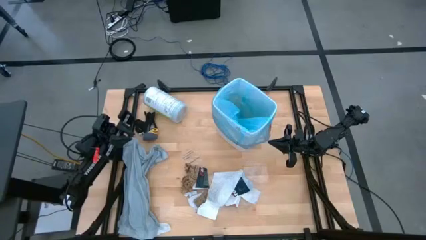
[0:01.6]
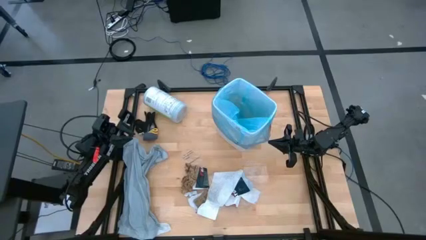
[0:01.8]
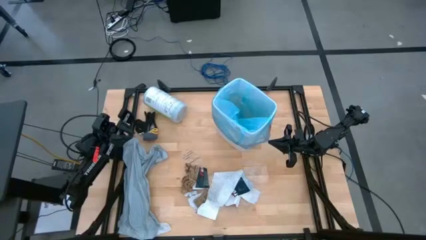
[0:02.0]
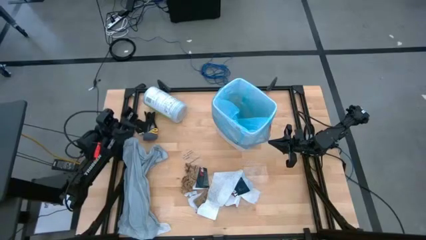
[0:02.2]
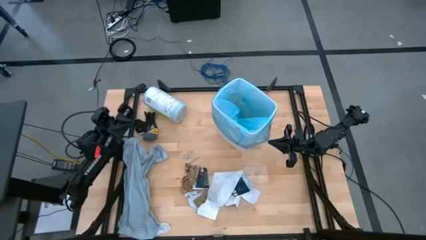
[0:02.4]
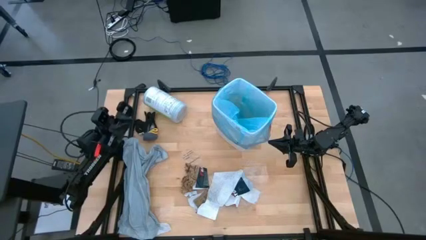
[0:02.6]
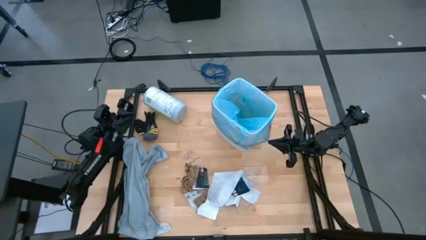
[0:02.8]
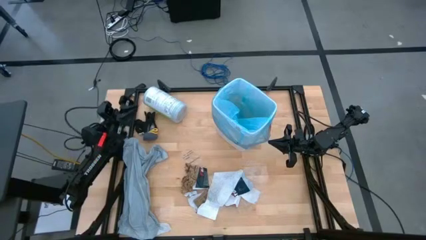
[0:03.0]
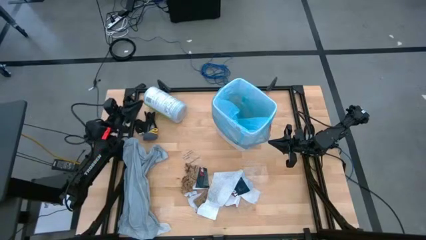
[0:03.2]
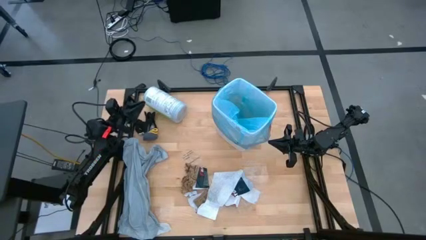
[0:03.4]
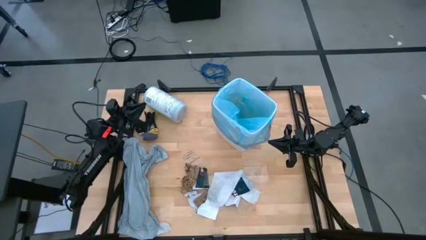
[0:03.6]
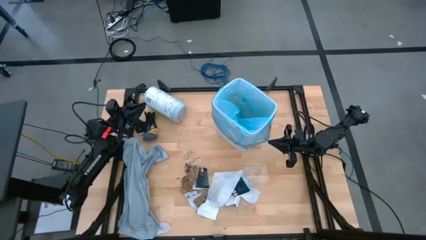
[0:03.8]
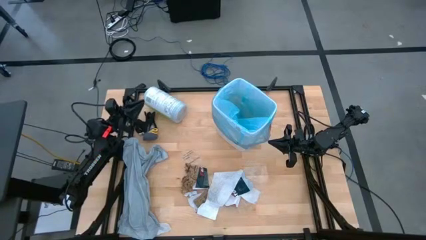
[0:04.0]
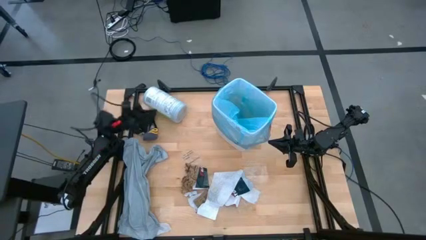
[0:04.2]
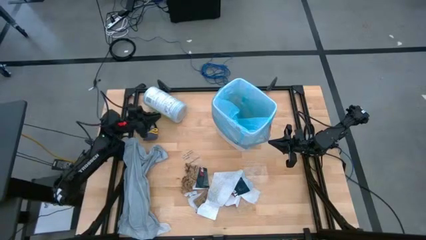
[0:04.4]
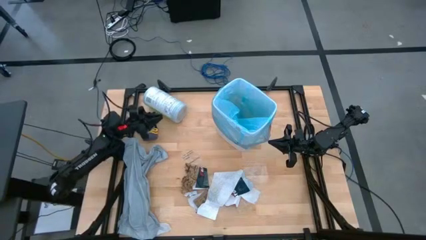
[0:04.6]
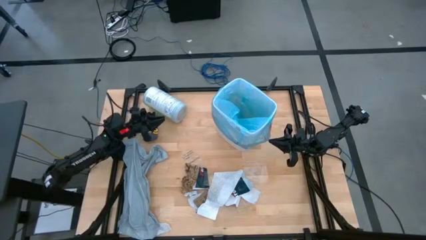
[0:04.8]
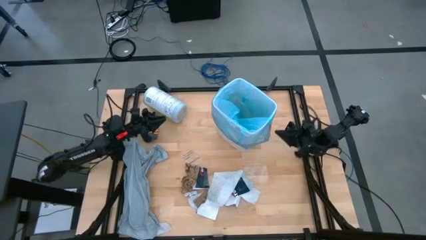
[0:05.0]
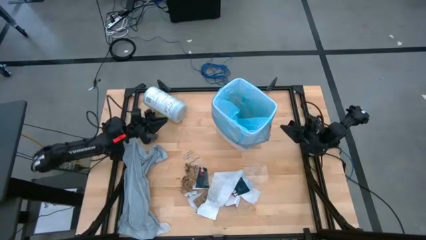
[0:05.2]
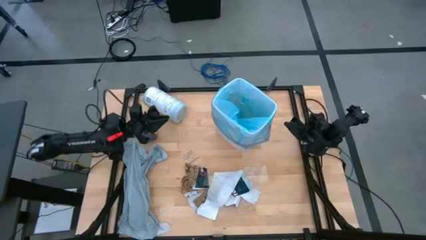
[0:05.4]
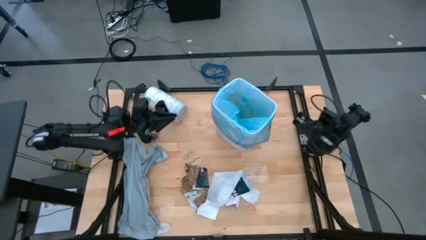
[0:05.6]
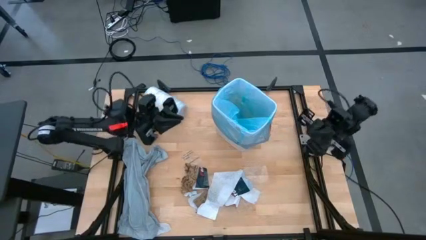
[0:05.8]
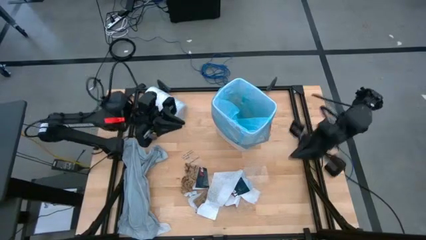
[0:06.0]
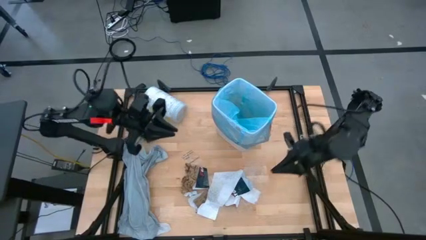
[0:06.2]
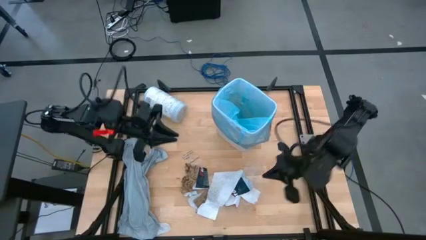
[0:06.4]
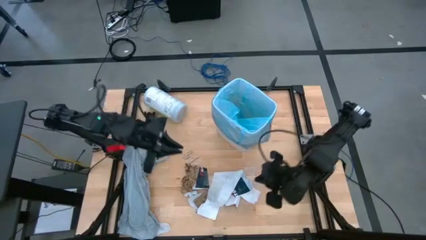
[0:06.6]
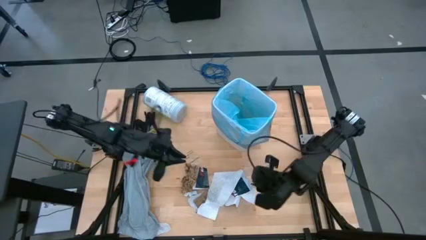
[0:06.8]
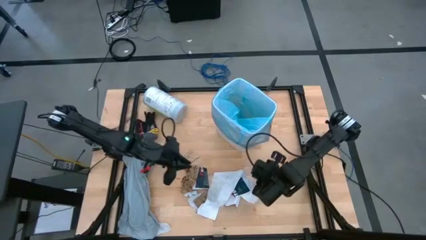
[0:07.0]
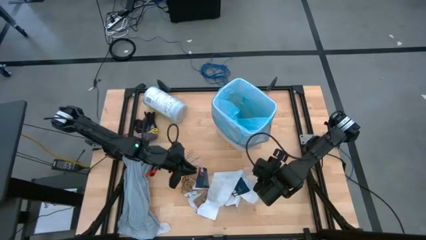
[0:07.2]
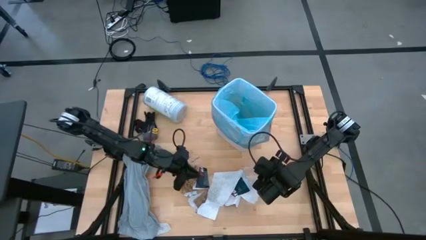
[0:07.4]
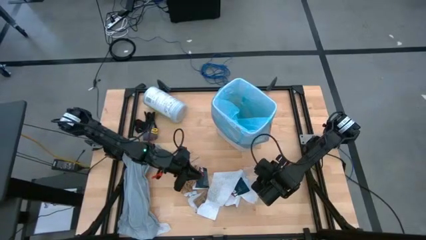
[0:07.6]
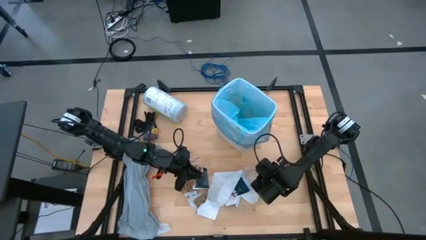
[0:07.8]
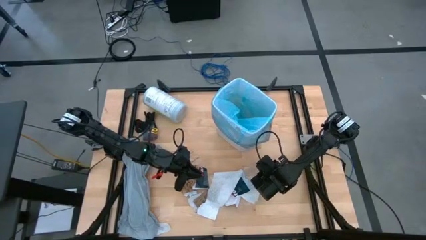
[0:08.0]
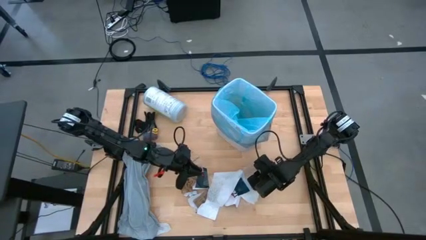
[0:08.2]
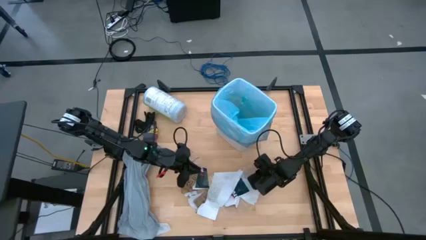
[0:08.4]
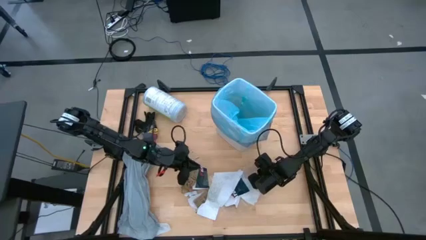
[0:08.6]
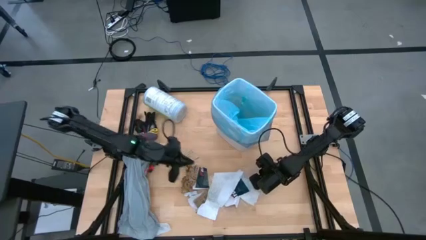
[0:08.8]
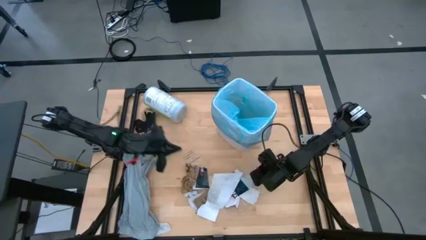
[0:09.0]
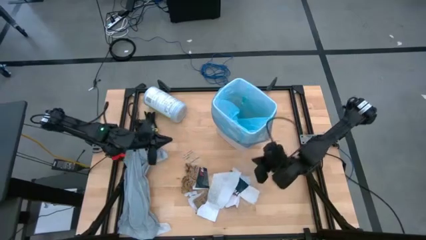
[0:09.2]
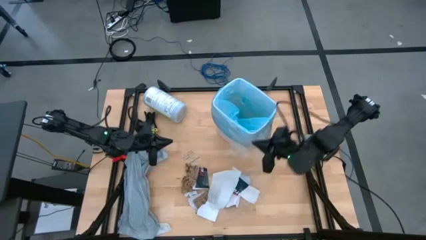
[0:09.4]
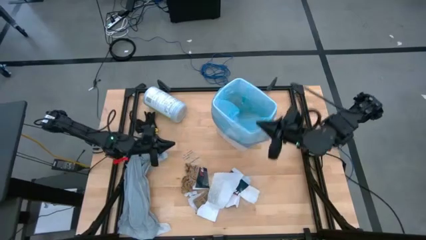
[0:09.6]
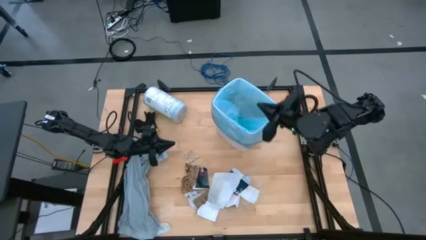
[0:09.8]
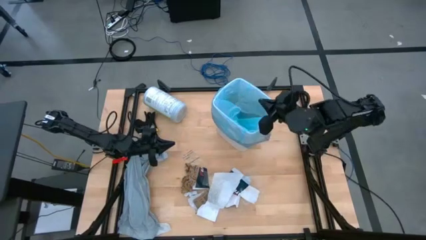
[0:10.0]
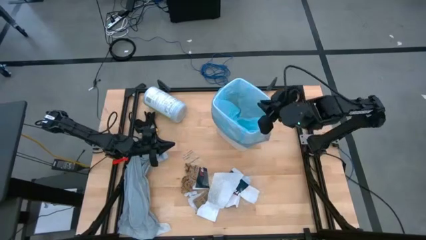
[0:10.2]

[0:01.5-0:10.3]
Task: place trash/remove bag and relplace
Put the transparent plastic into the trash bin

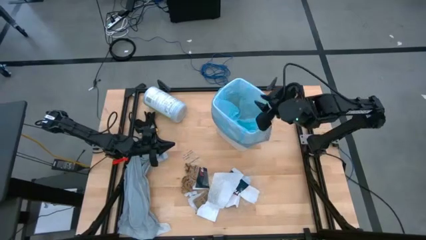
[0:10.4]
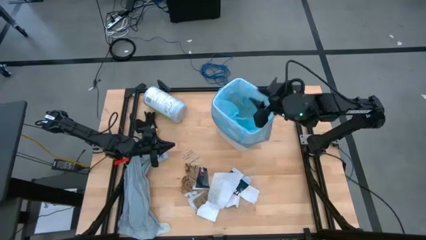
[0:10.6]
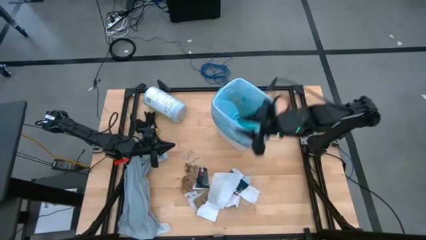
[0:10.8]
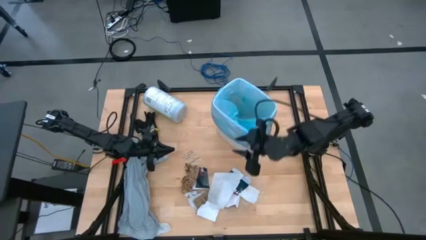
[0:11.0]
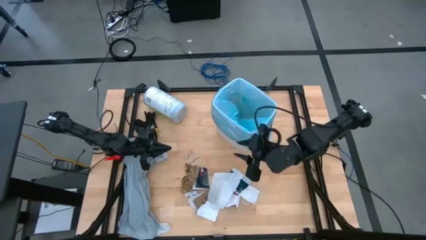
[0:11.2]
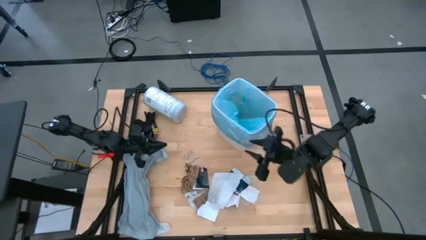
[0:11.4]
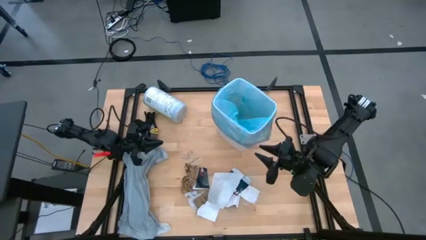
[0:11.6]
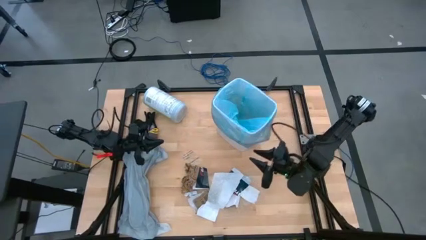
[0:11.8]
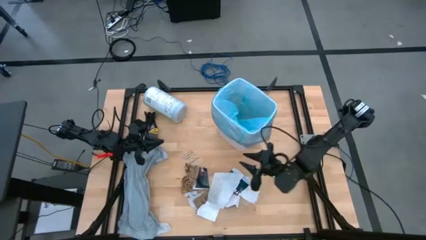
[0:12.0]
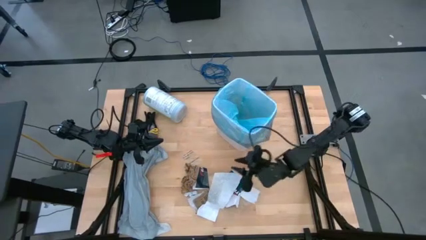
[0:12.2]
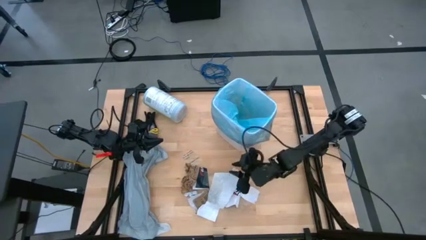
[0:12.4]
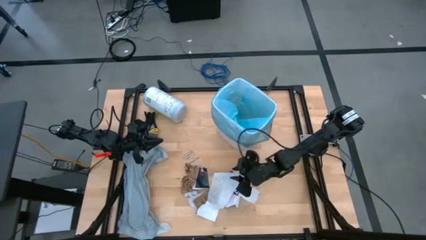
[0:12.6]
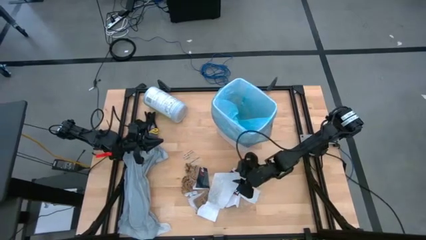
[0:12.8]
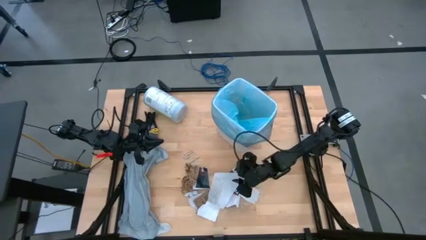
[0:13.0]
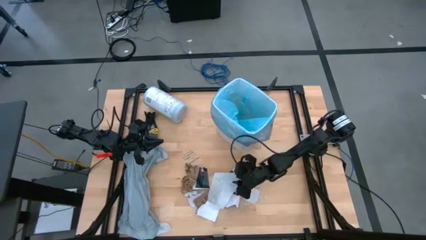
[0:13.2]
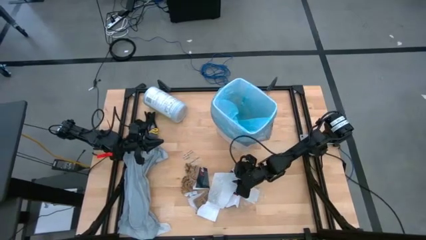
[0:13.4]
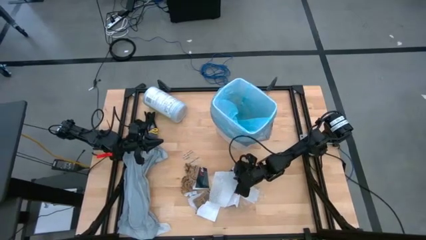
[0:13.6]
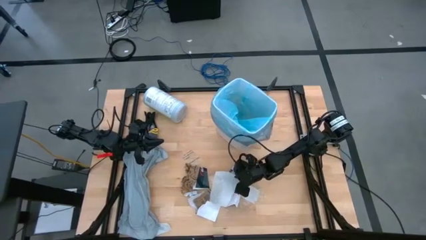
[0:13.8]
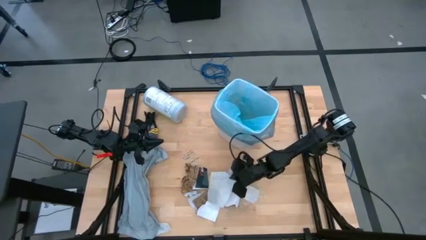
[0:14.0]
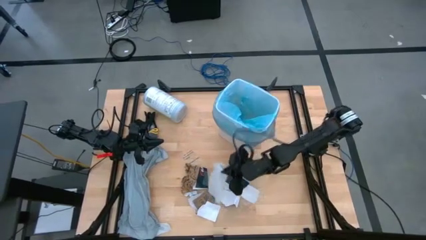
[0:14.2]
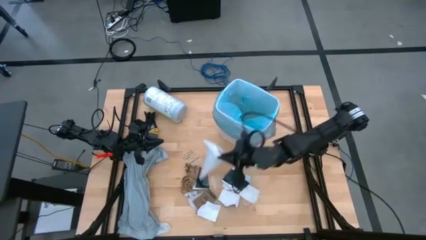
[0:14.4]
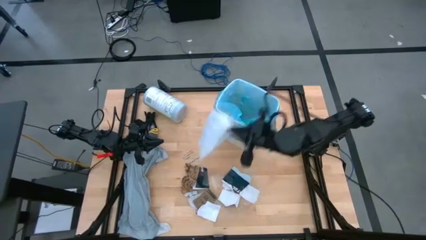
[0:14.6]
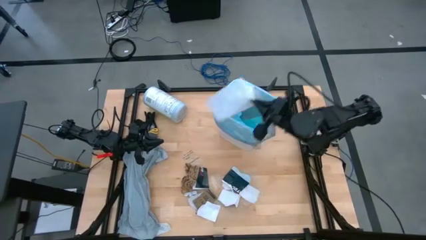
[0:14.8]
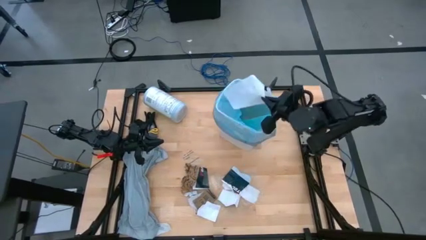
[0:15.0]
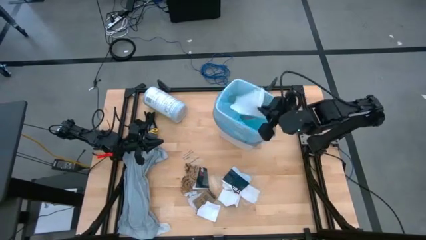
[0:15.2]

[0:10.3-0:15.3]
Put the white napkin into the trash bin

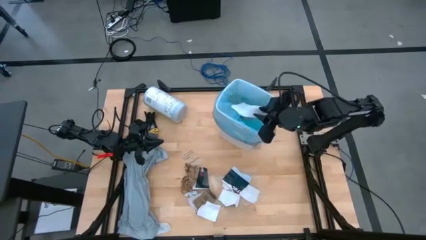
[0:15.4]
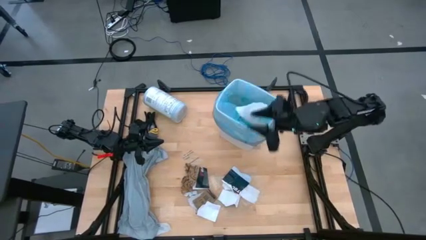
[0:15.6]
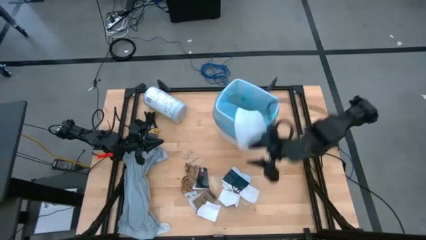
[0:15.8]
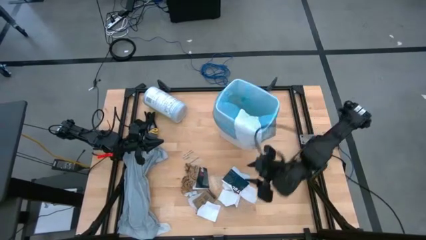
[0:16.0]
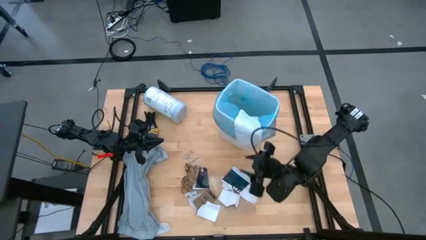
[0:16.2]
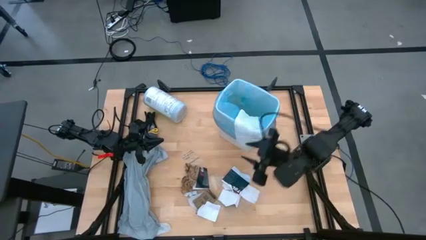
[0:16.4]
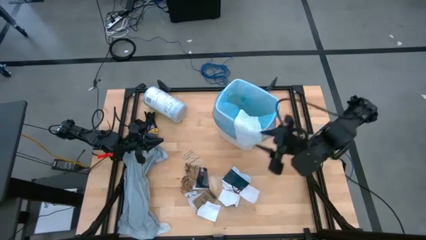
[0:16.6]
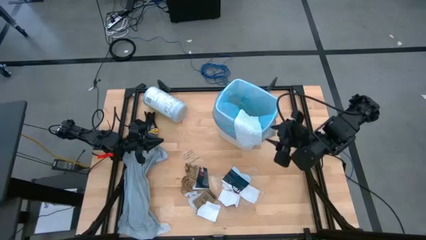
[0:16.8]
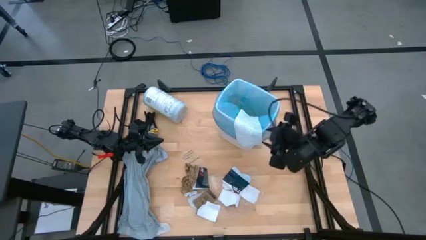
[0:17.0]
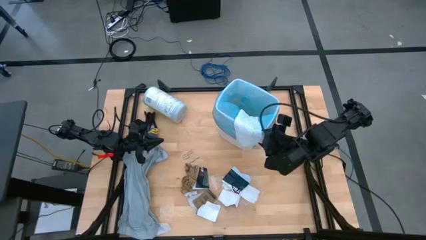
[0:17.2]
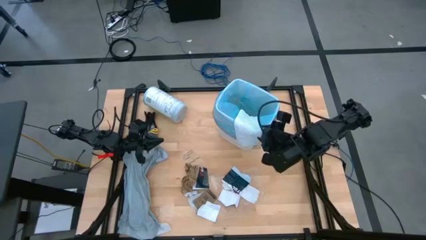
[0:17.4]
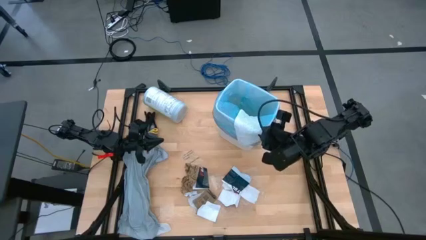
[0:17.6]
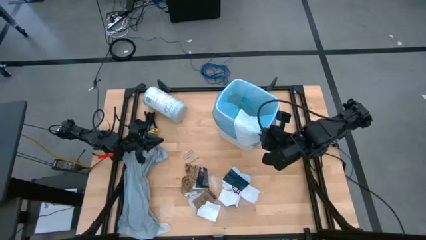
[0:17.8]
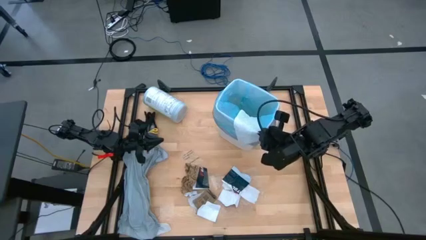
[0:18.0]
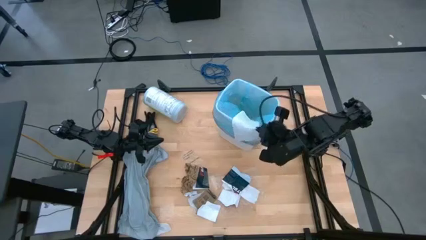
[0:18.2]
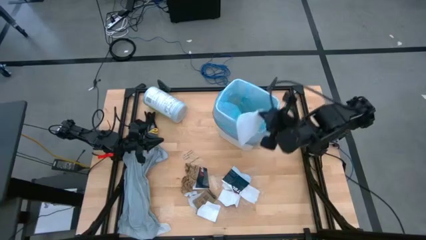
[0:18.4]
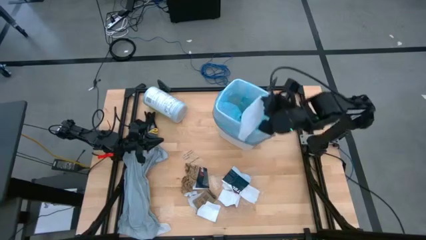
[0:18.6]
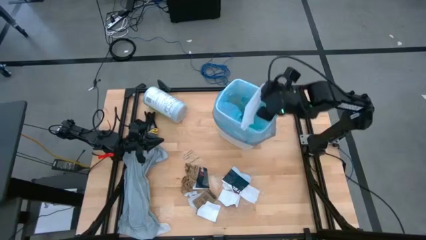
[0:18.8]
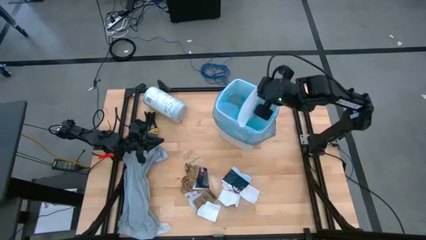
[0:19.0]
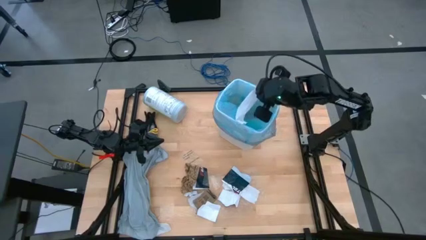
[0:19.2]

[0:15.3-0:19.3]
Put the white napkin into the trash bin
